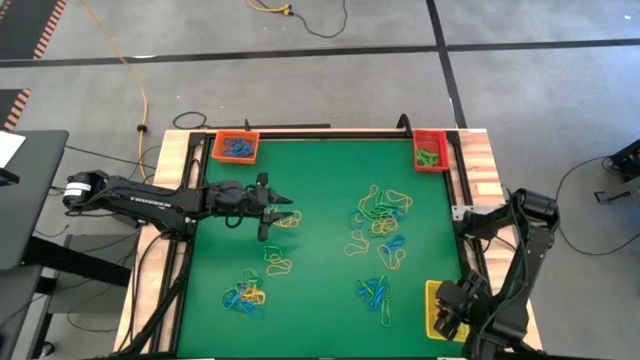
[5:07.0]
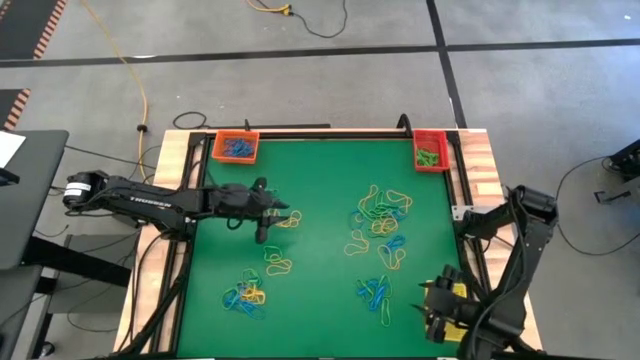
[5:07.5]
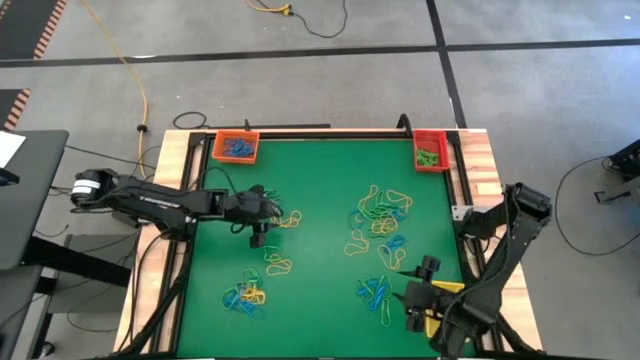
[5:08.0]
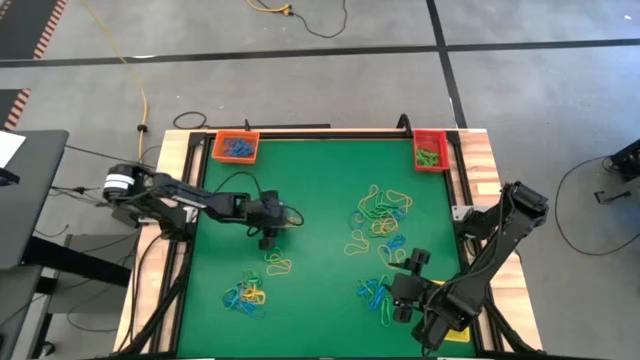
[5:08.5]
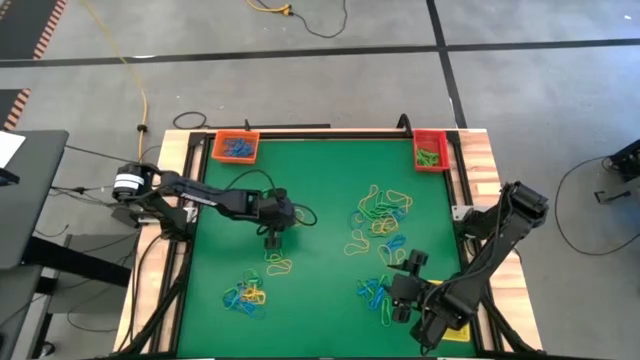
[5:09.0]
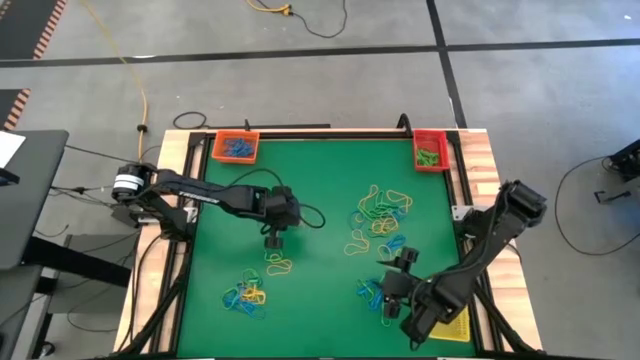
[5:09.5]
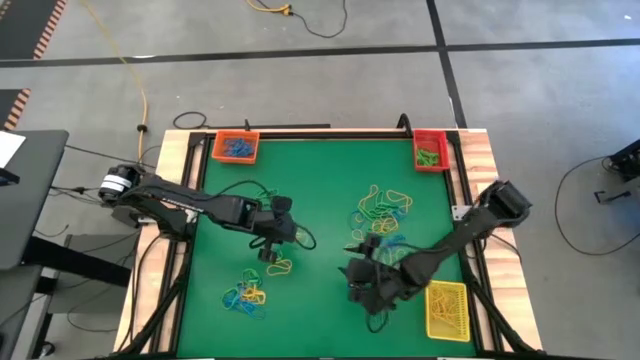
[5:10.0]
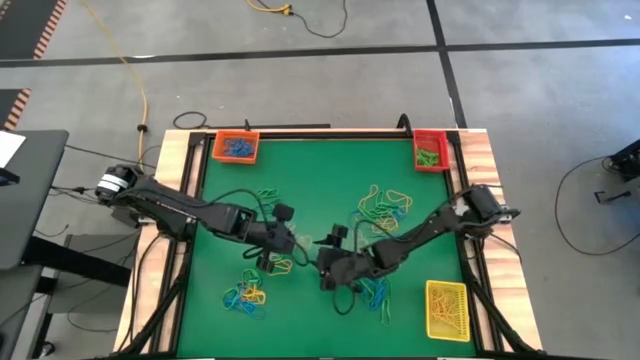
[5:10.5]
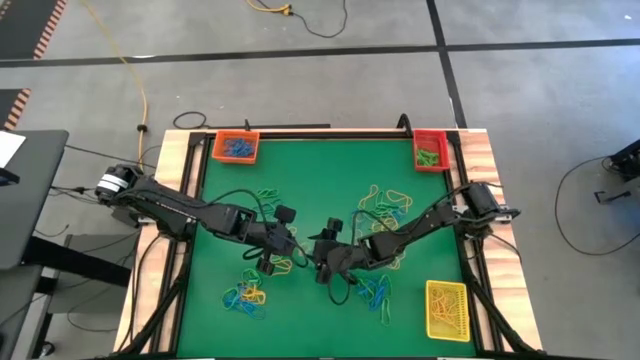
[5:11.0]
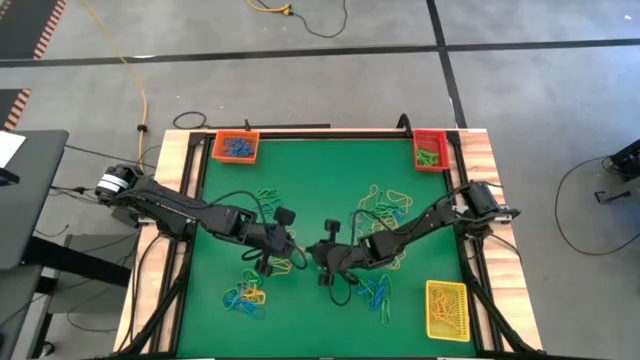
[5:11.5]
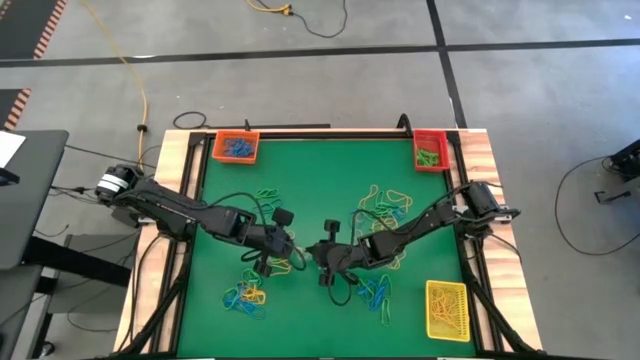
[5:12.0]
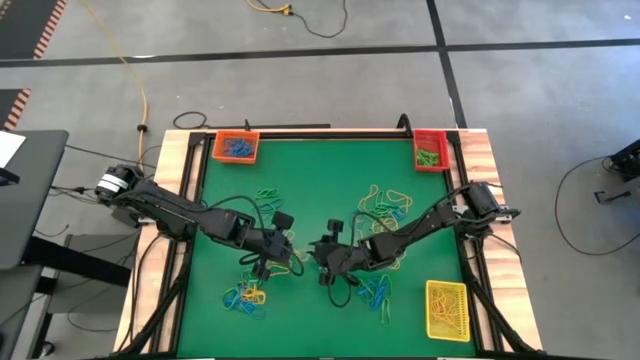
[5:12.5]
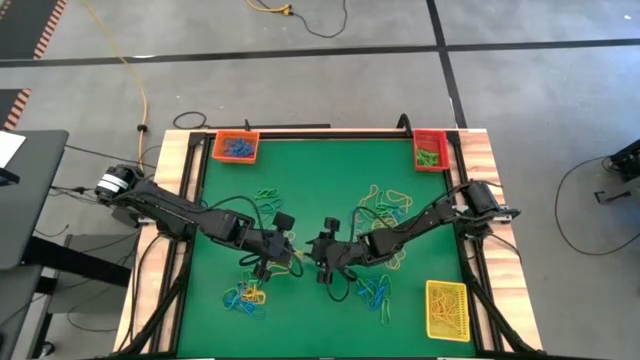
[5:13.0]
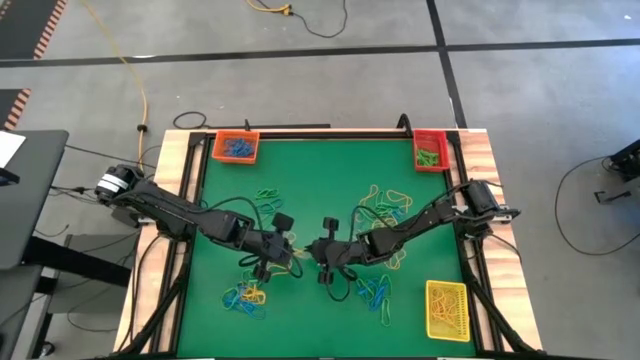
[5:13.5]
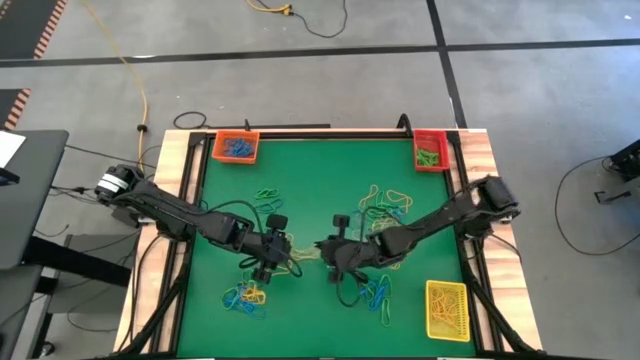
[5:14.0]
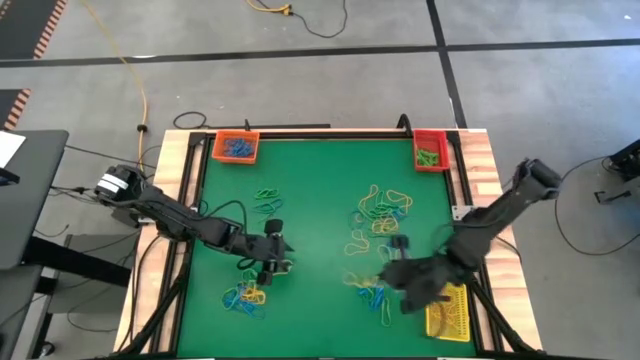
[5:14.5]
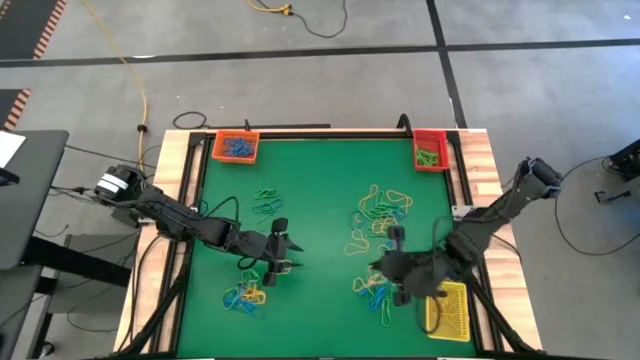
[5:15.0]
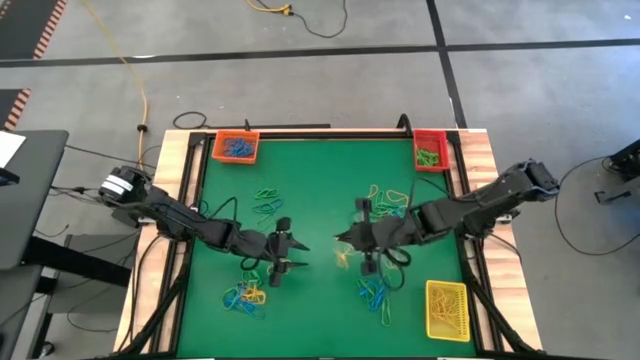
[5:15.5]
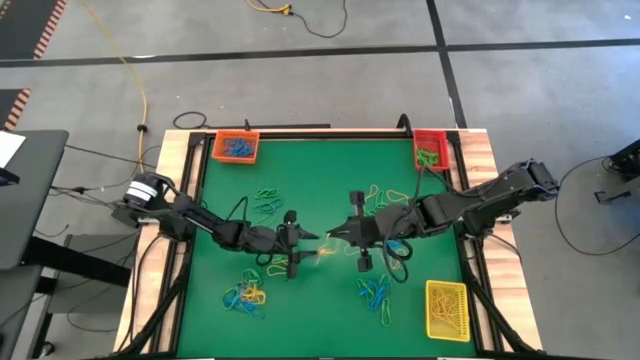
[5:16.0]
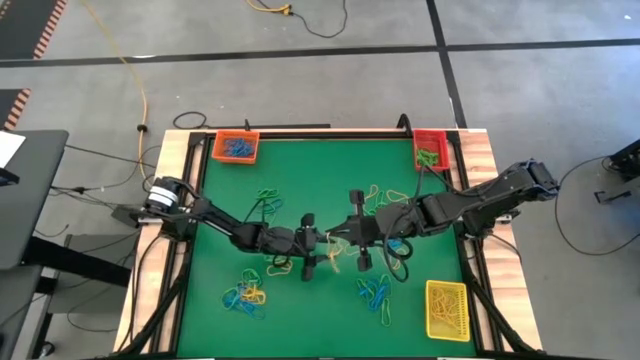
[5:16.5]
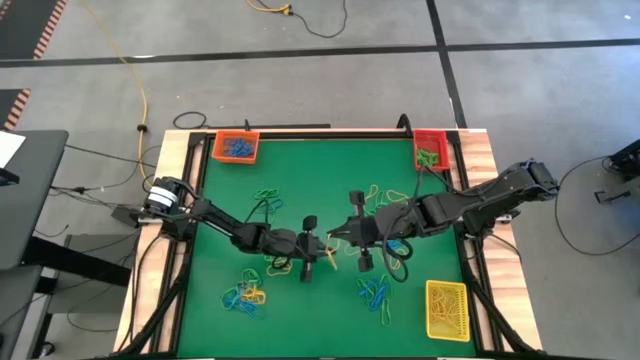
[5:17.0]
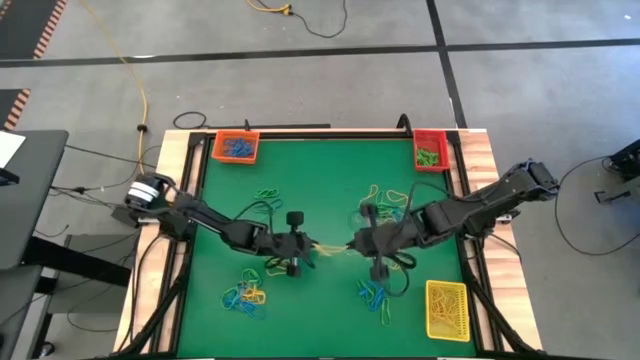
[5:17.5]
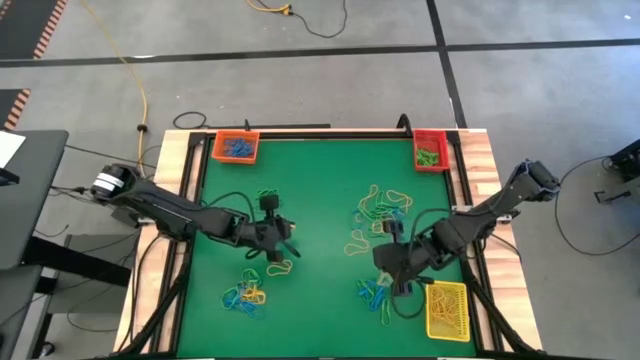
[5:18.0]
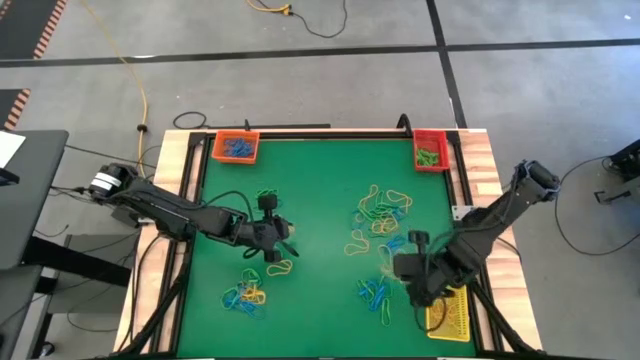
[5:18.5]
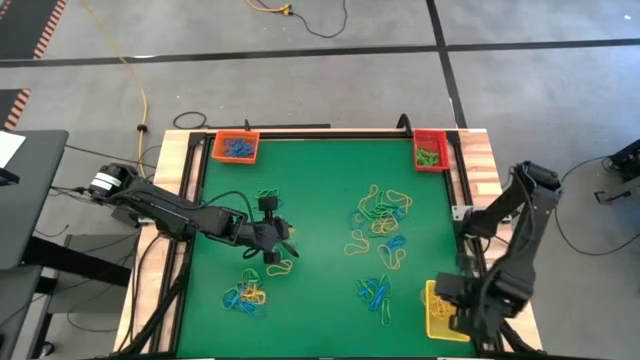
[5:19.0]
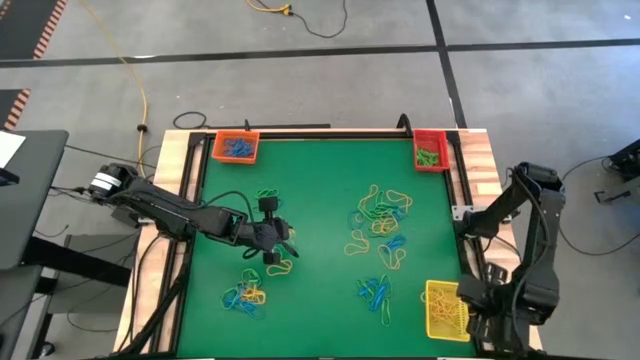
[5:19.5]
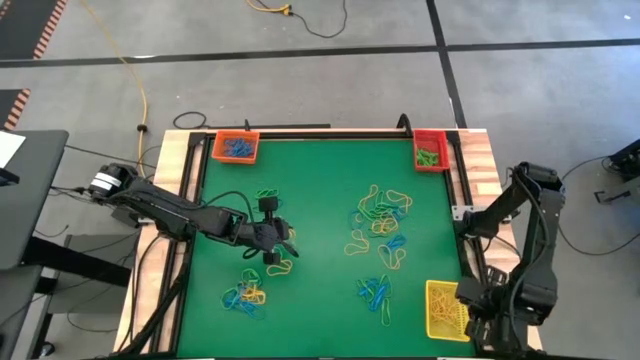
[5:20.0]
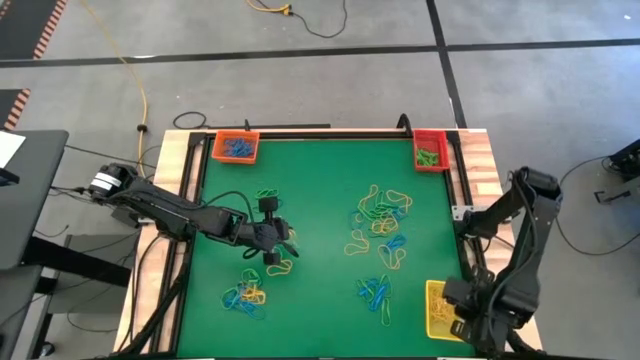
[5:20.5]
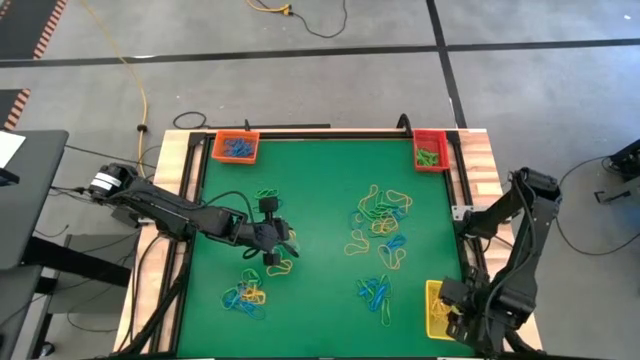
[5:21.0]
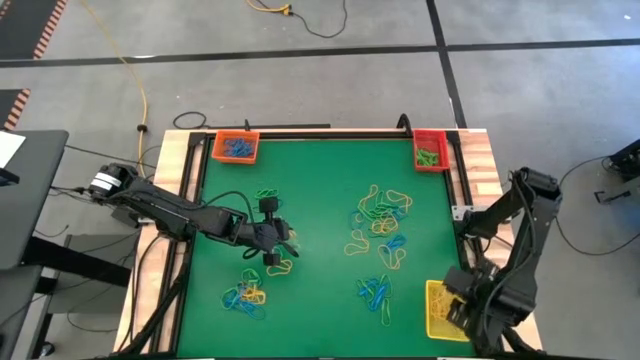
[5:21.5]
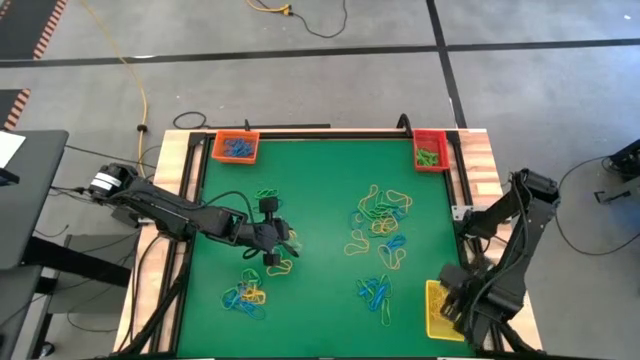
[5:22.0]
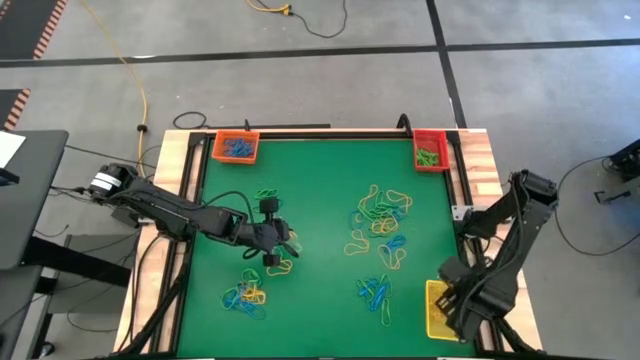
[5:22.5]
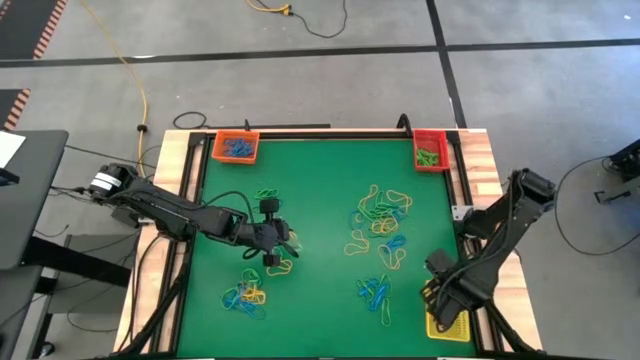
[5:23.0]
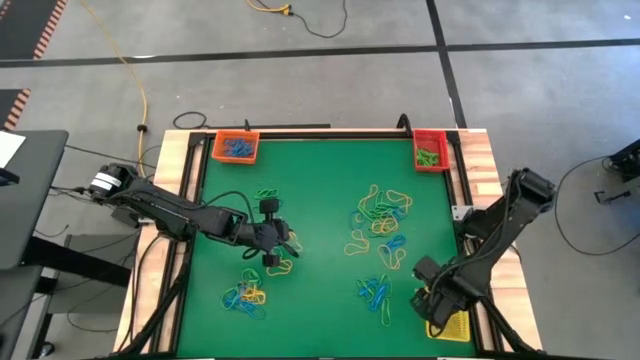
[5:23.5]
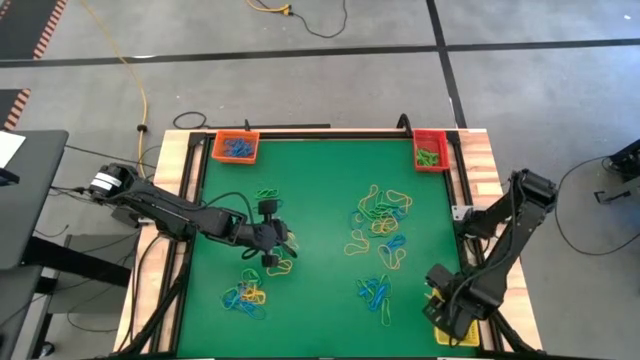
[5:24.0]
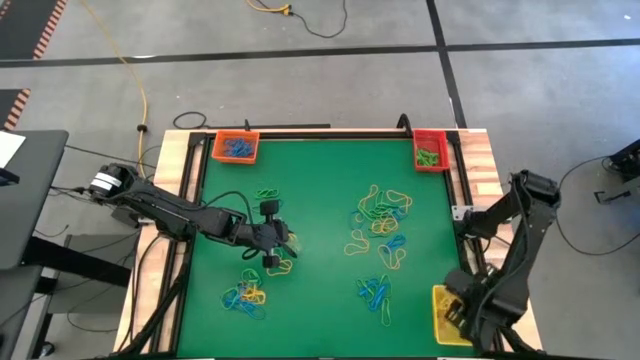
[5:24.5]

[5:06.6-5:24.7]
Task: Sort rubber bands into baskets
Put the top left yellow rubber band into the yellow bin

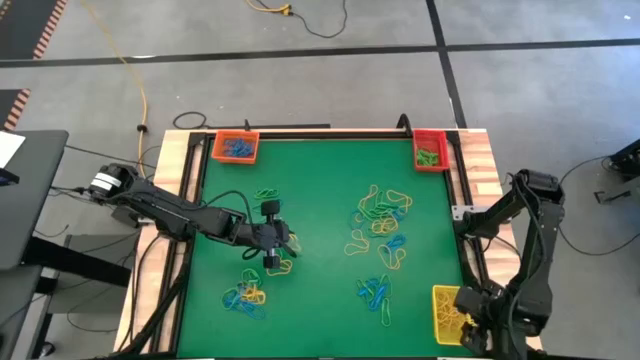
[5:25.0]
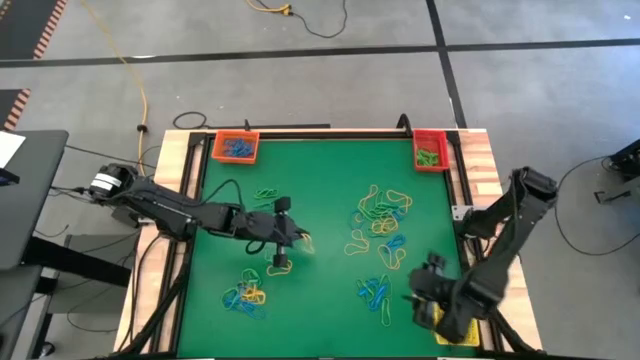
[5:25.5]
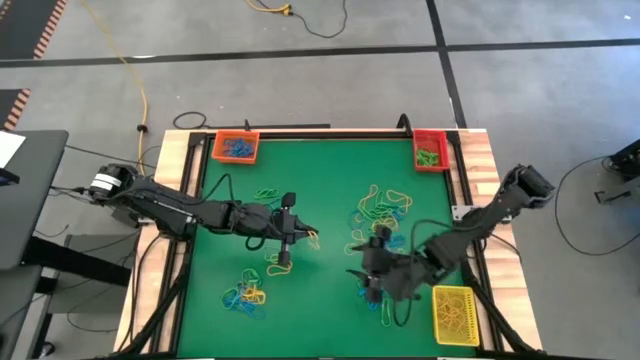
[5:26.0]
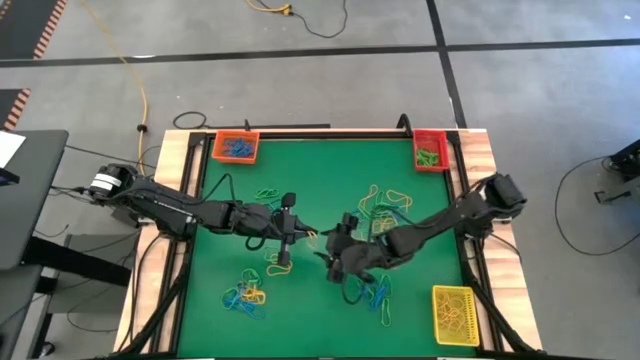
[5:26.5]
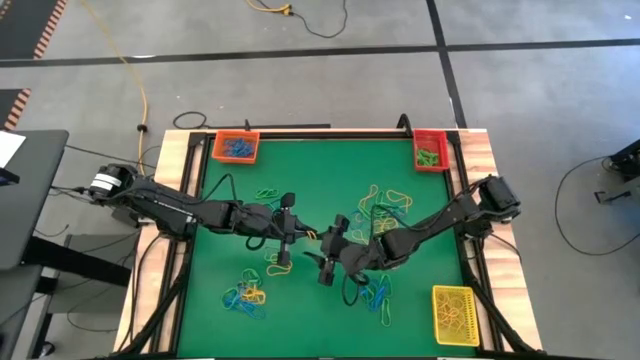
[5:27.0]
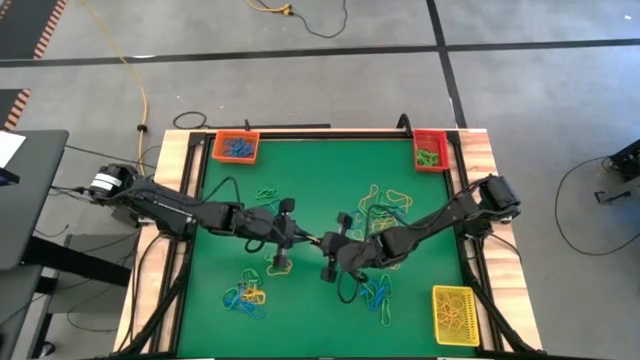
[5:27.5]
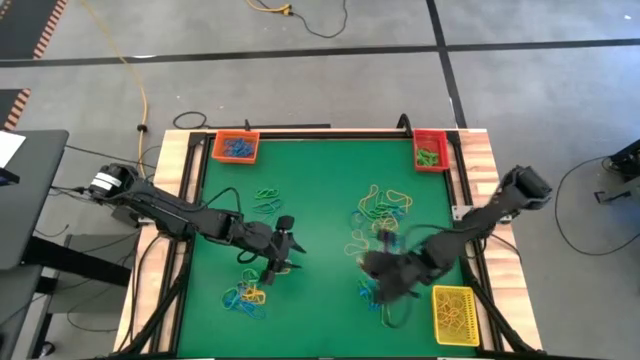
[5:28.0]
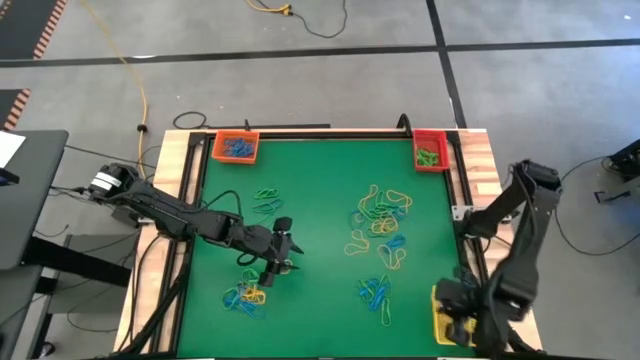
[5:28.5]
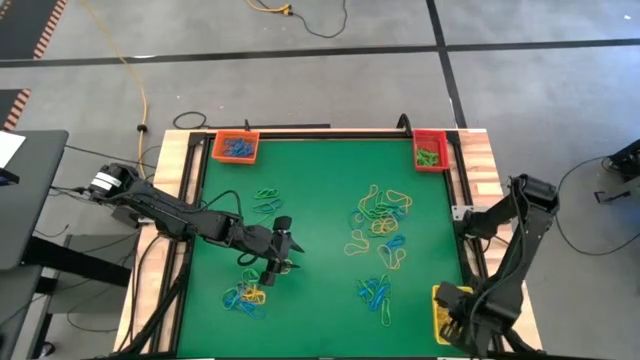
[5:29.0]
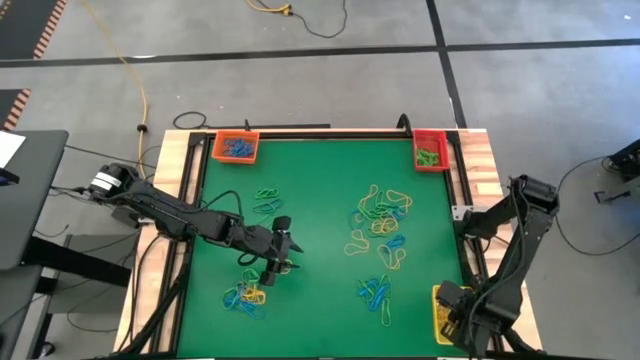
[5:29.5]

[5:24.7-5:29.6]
Put the top left yellow rubber band into the yellow bin
